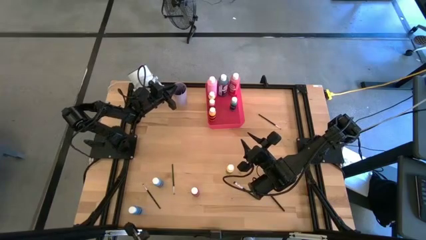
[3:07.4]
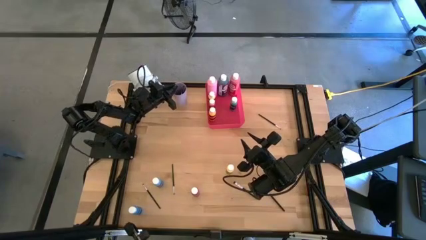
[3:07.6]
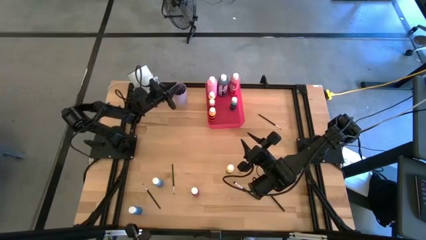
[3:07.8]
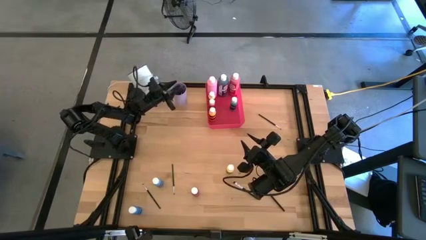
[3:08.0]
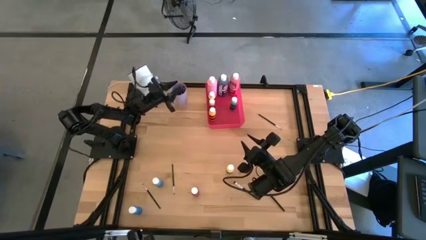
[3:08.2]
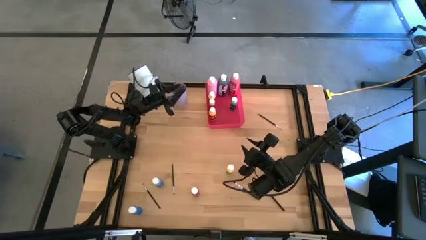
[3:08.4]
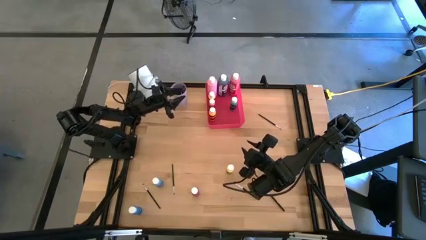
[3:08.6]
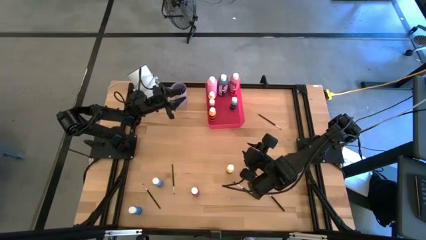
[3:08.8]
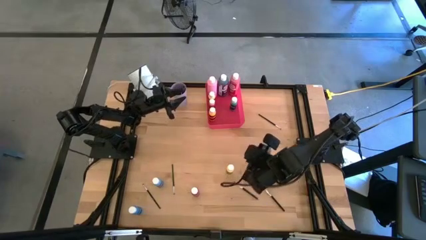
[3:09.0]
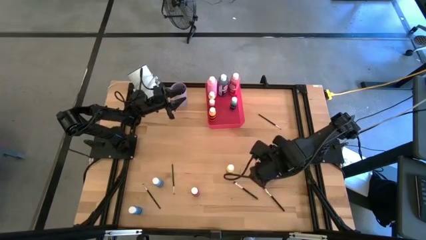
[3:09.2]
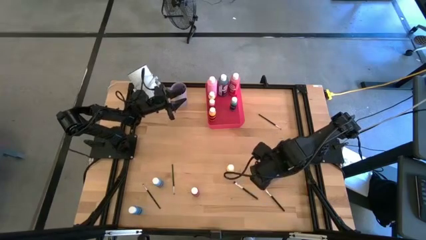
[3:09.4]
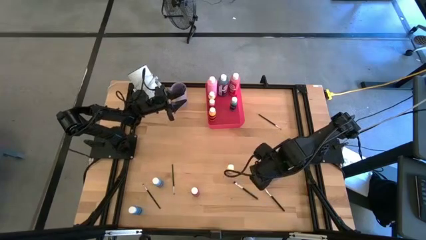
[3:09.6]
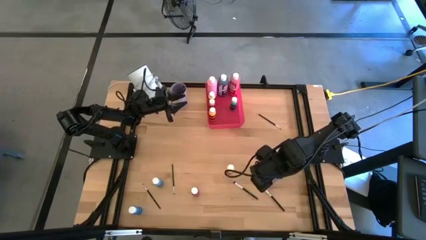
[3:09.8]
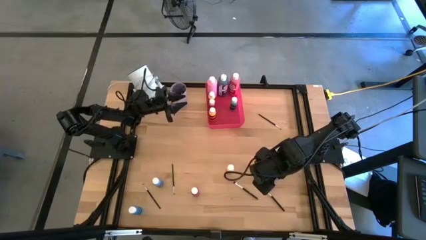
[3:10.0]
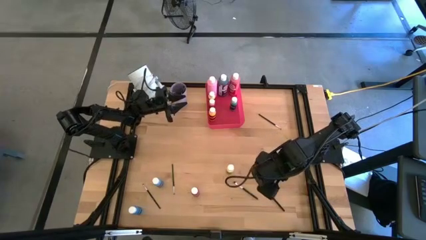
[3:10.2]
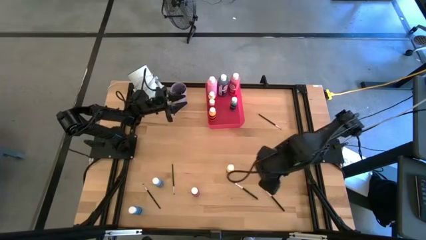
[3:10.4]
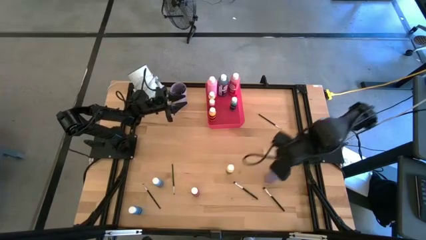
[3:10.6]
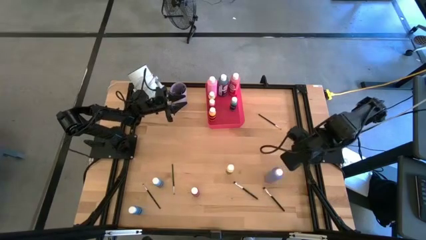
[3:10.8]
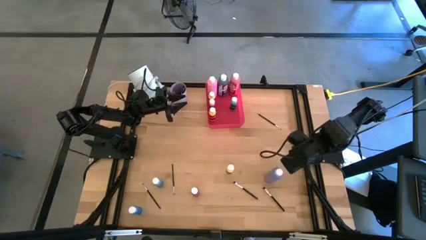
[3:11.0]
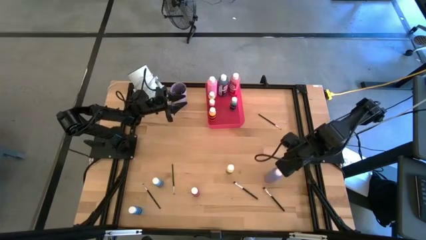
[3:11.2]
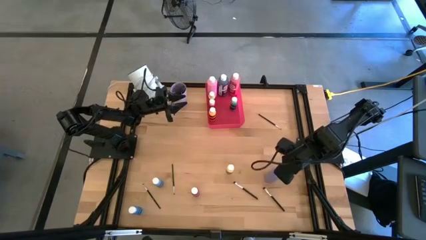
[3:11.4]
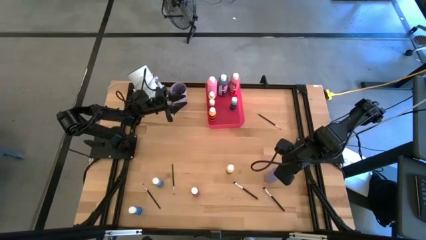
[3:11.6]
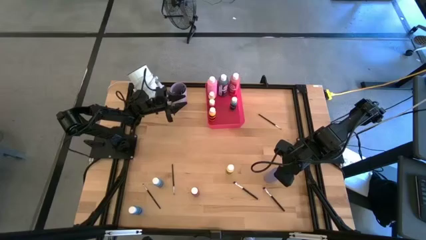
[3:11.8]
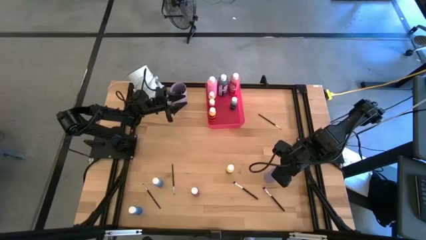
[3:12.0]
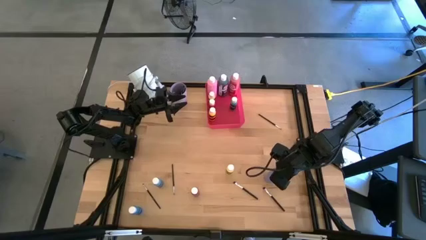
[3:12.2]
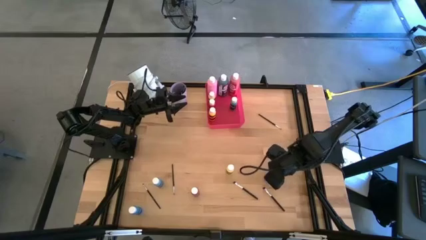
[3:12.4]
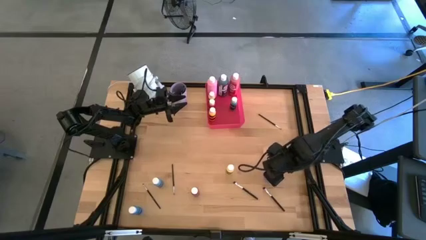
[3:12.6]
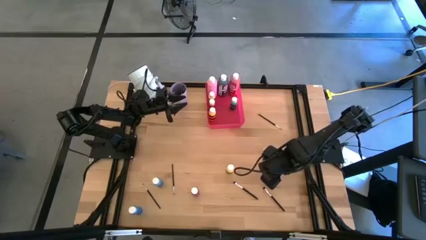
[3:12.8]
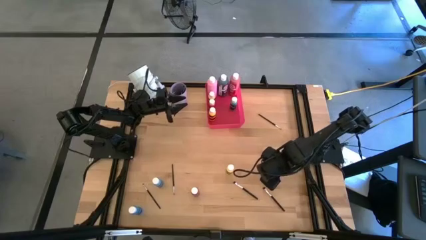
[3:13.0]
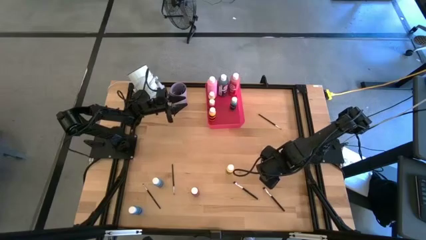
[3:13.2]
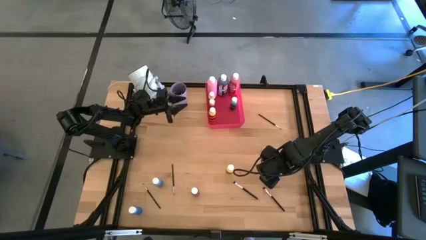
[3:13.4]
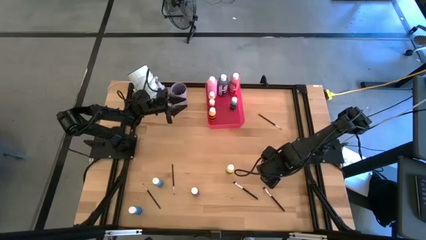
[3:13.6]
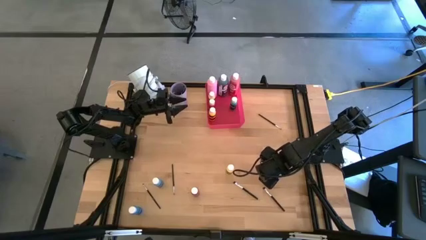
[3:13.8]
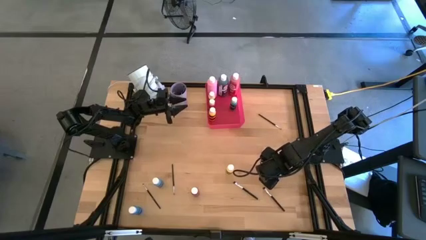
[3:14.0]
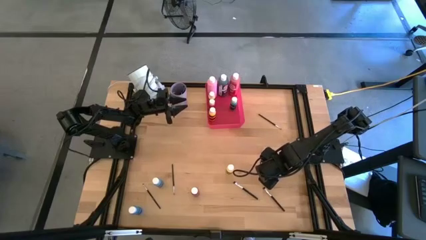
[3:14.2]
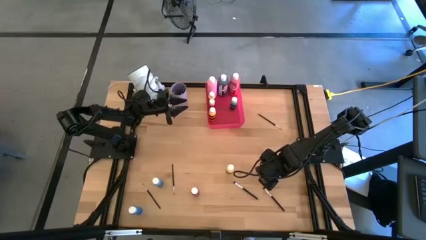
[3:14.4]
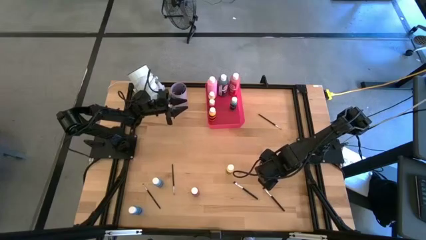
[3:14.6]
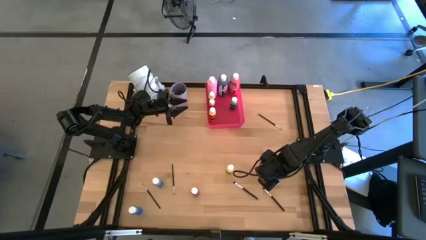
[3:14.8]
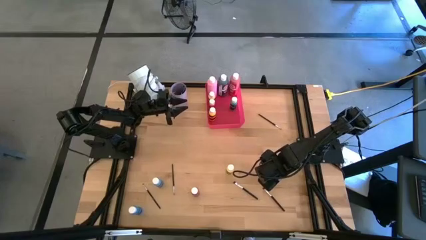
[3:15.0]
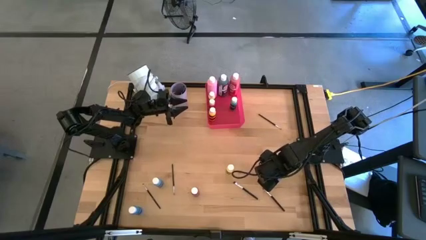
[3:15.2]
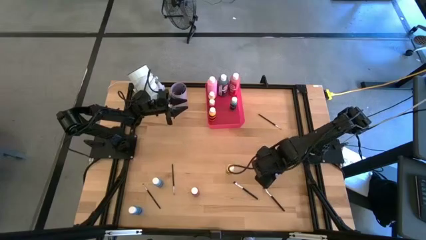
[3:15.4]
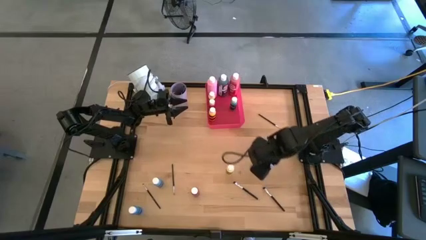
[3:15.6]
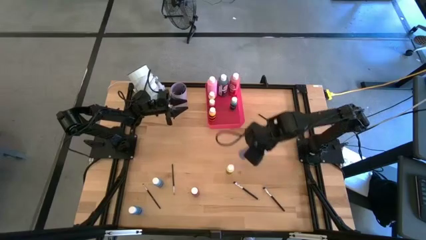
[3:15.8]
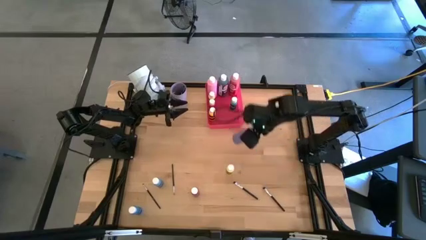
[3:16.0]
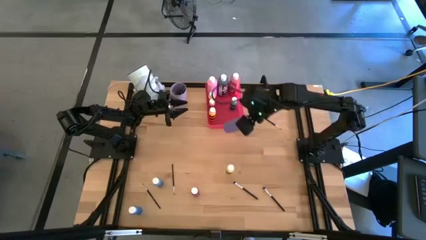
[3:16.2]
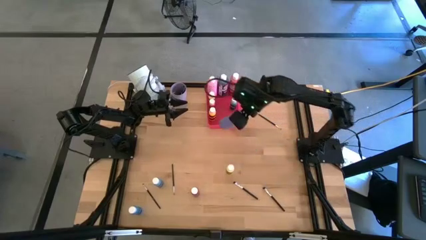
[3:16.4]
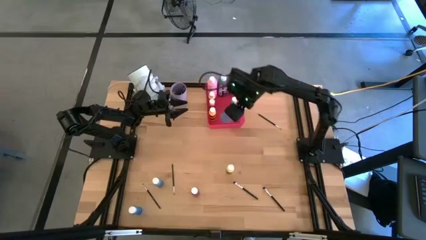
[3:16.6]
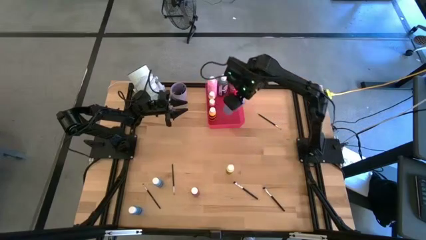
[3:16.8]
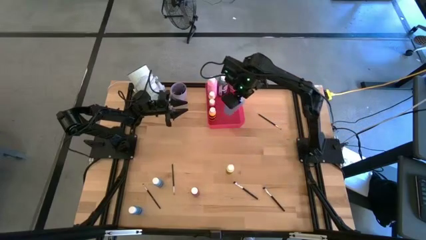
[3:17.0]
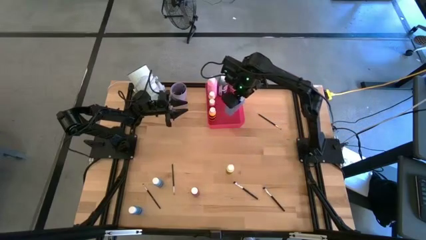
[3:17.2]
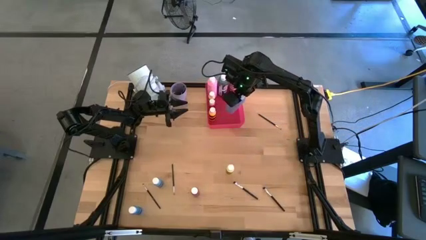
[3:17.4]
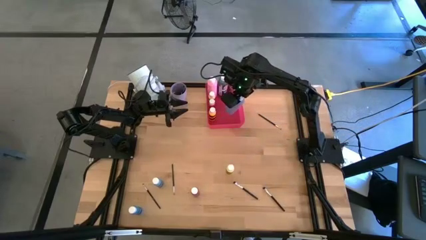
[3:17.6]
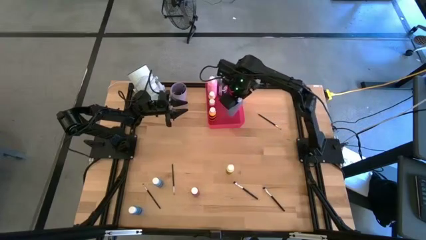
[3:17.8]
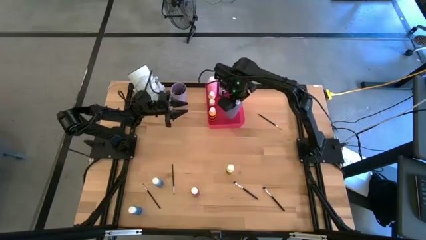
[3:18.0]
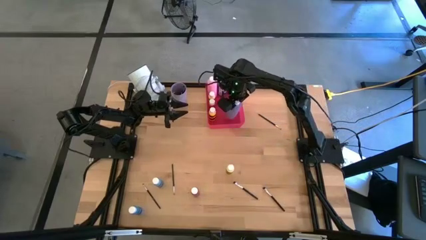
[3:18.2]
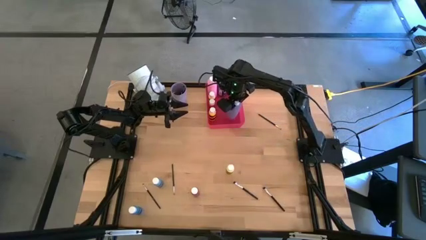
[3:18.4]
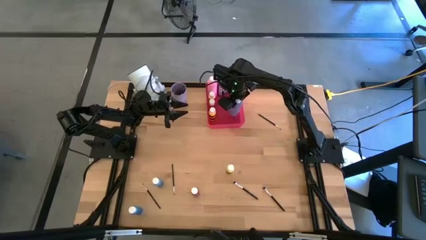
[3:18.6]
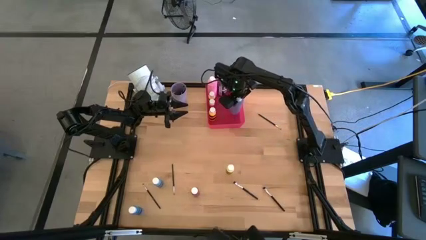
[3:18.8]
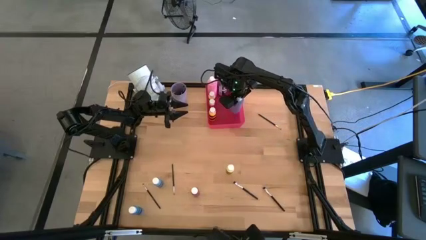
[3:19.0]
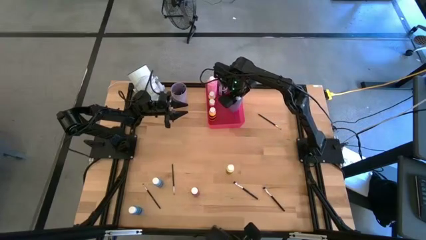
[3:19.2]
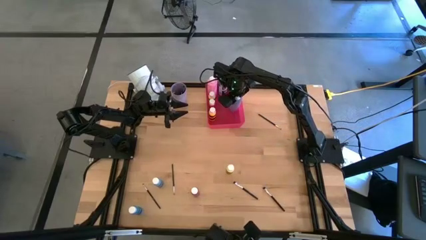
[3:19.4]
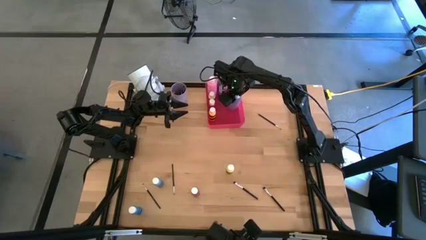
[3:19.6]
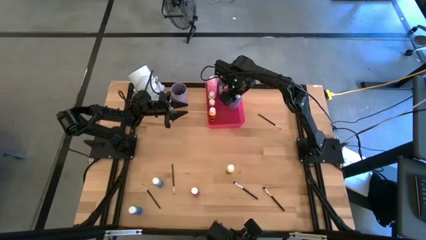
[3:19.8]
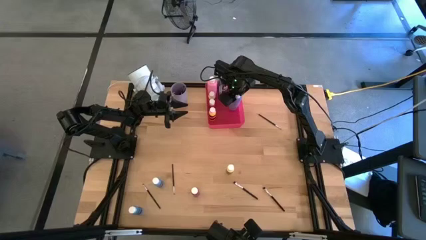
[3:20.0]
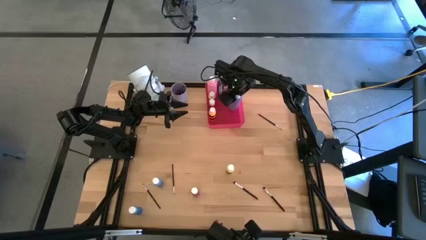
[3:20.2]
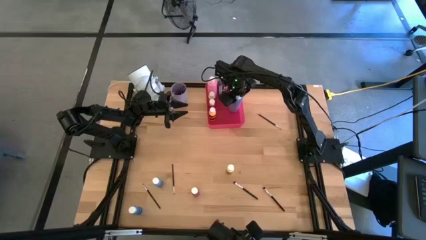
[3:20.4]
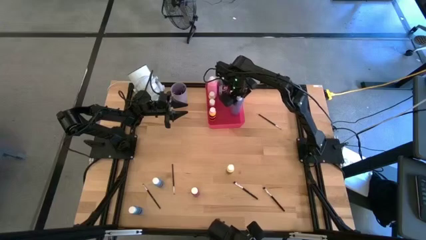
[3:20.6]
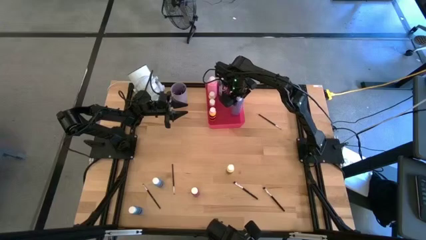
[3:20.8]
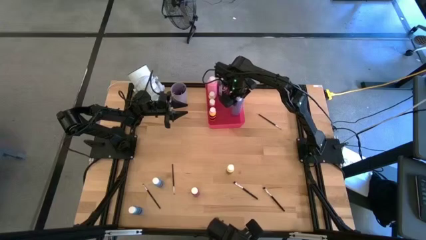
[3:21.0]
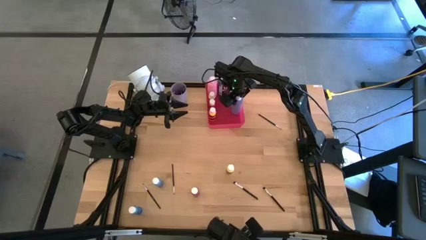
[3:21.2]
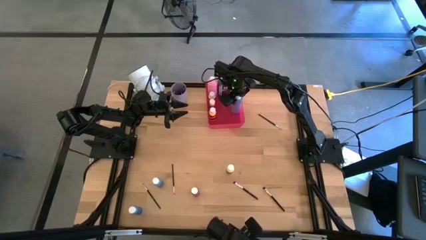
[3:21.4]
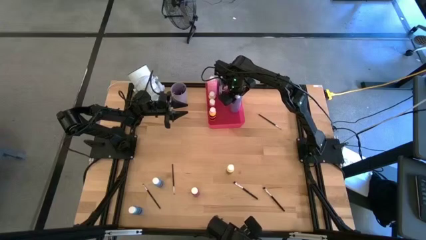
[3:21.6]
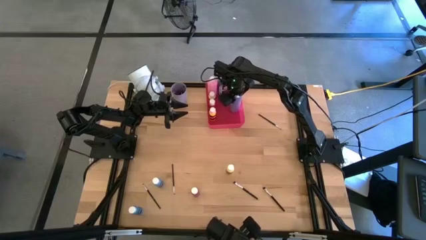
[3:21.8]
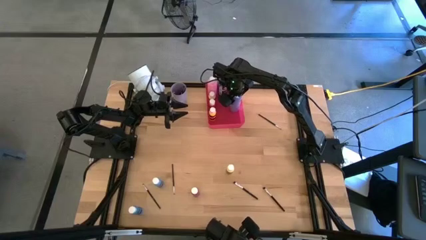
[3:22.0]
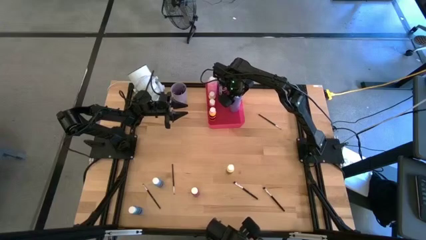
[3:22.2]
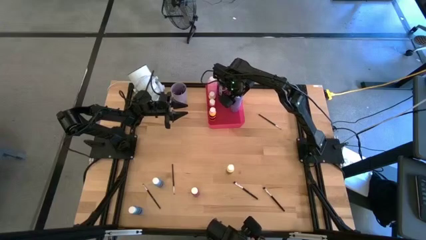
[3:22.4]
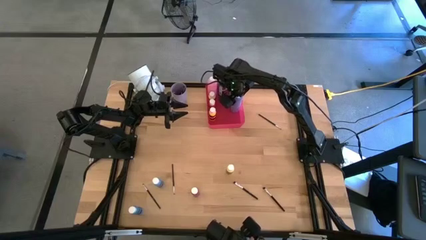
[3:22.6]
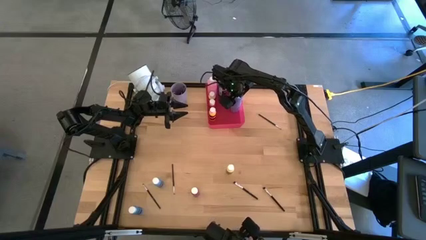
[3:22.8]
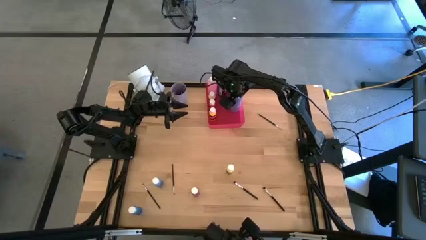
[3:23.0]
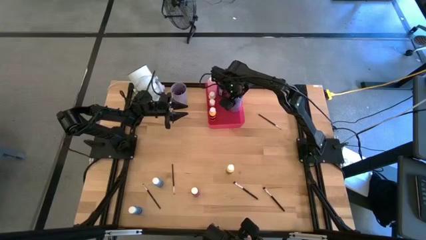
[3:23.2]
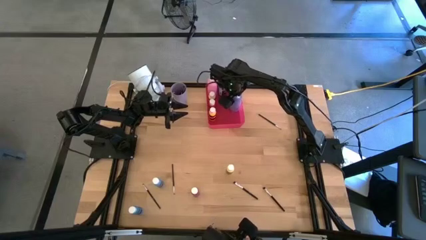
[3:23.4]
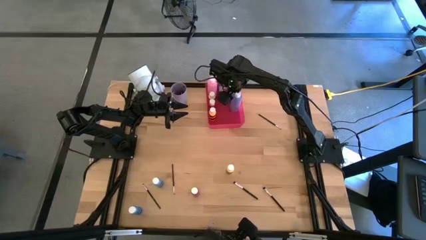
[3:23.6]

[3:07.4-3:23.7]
Task: Pick & Place Paint Supplies
Put the violet paint bottle into the red bin

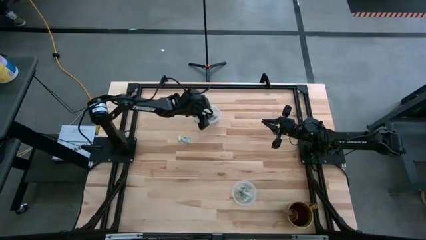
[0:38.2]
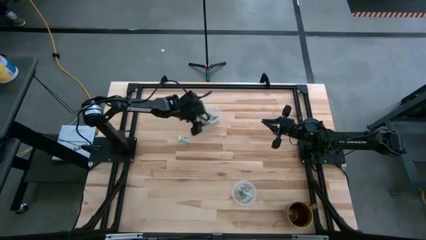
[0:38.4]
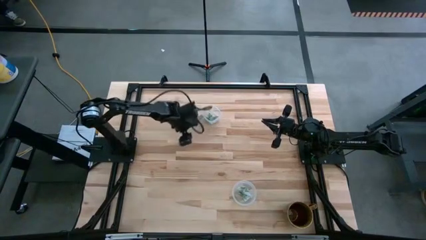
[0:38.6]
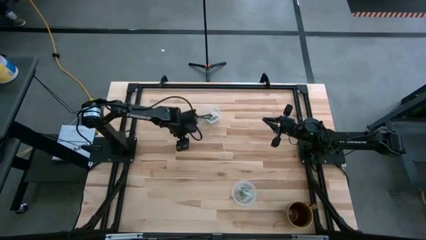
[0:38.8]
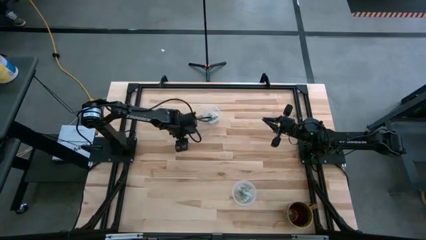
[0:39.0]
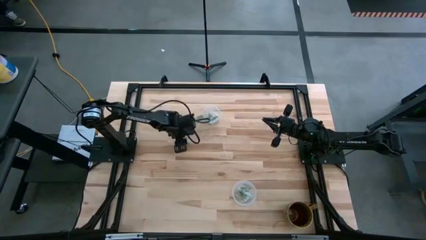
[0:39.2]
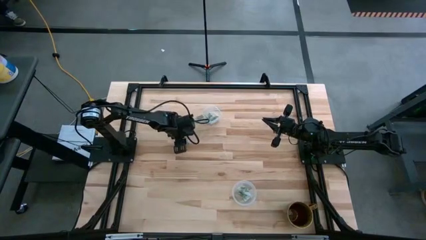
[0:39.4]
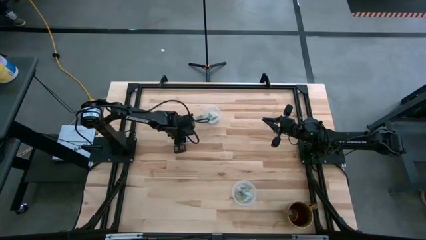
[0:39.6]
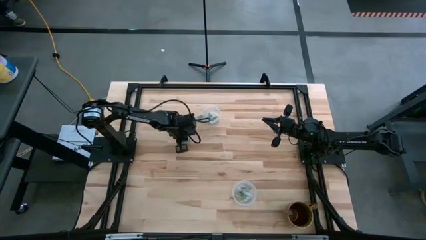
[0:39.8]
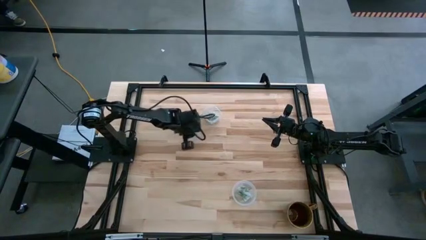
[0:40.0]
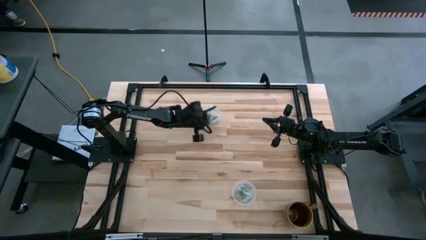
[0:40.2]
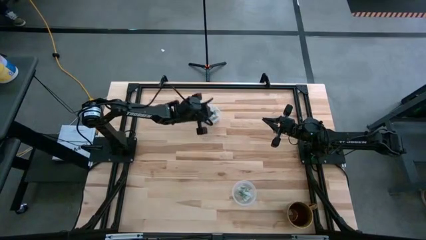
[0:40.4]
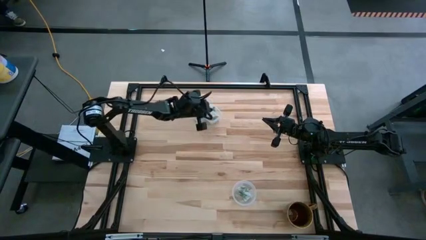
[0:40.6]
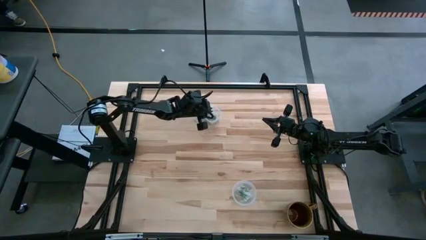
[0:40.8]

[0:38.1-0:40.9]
Task: Pick and place Stevia / Truvia into bins
Put the bottom stevia packet into the top transparent container
